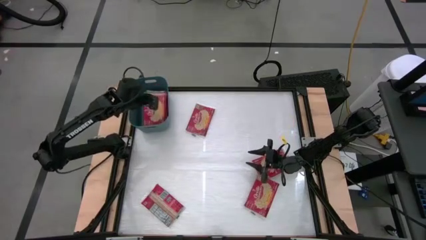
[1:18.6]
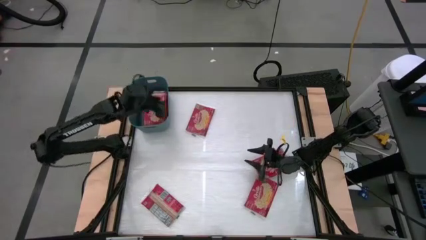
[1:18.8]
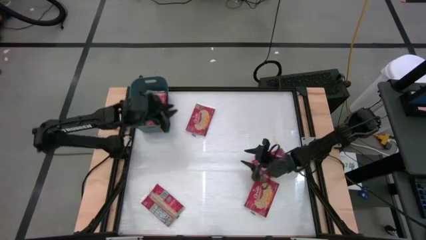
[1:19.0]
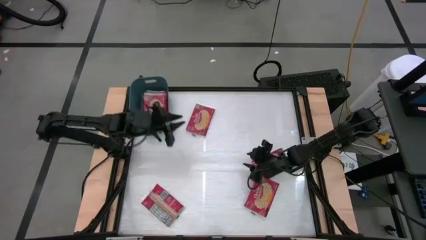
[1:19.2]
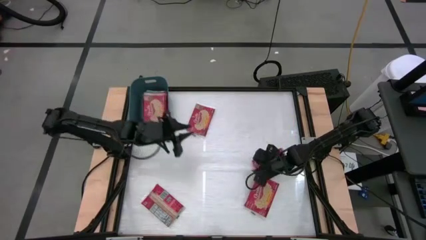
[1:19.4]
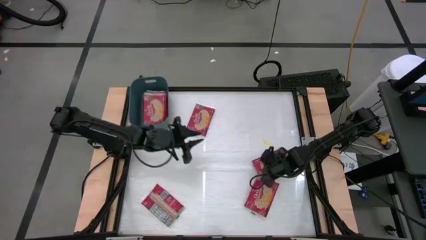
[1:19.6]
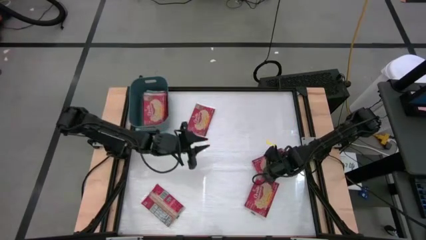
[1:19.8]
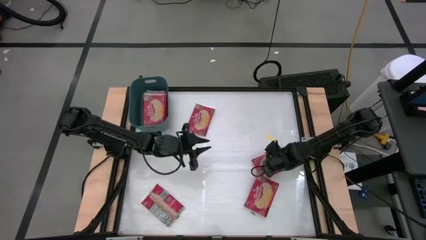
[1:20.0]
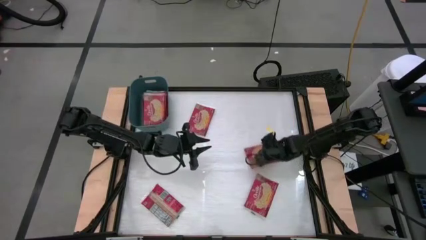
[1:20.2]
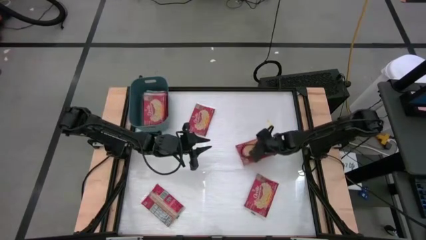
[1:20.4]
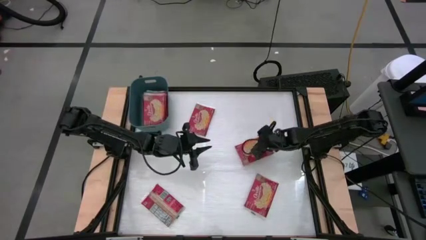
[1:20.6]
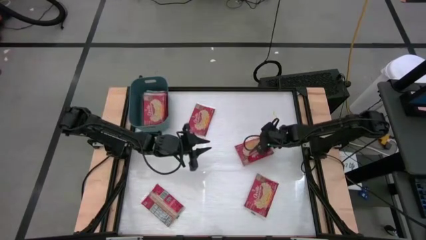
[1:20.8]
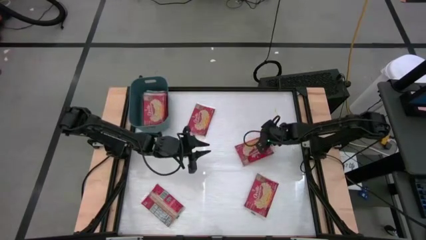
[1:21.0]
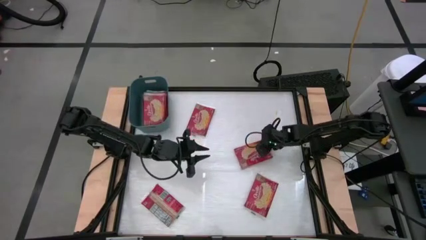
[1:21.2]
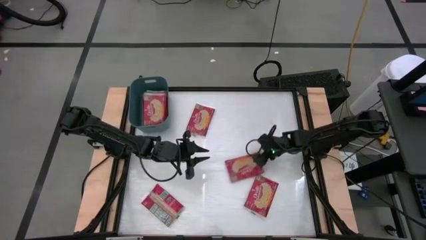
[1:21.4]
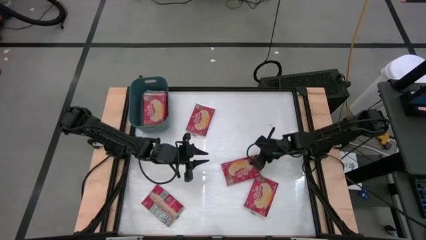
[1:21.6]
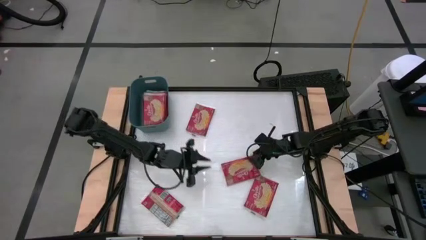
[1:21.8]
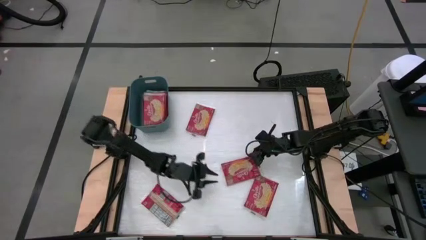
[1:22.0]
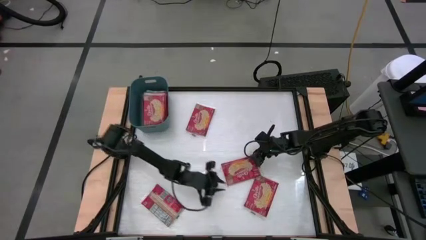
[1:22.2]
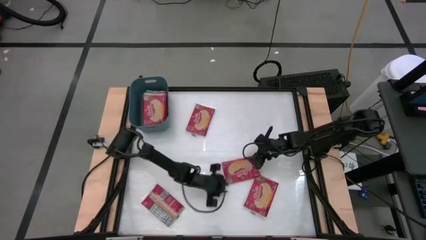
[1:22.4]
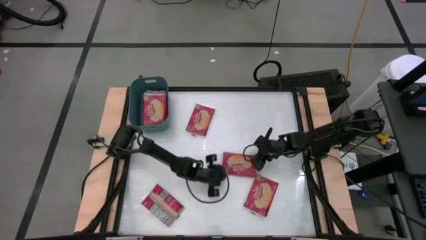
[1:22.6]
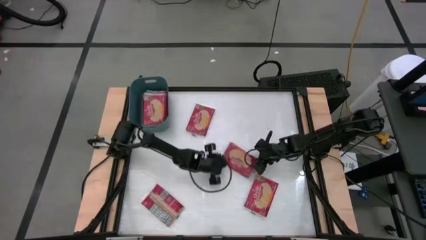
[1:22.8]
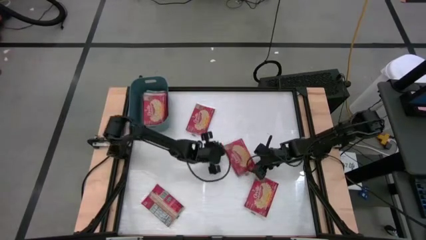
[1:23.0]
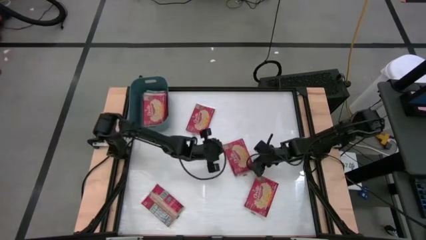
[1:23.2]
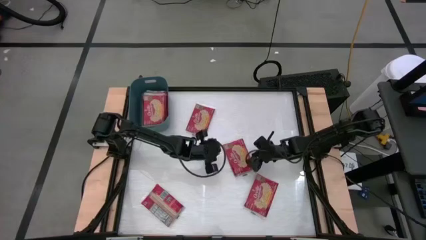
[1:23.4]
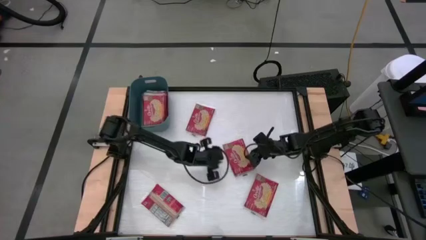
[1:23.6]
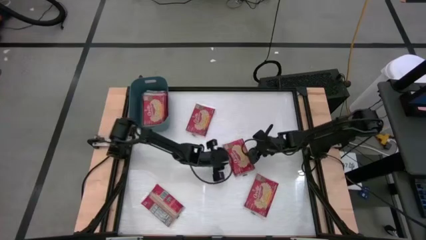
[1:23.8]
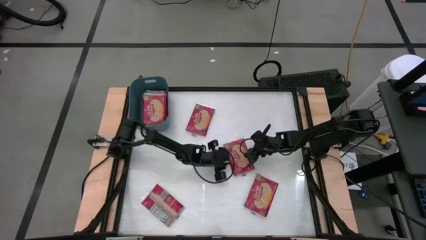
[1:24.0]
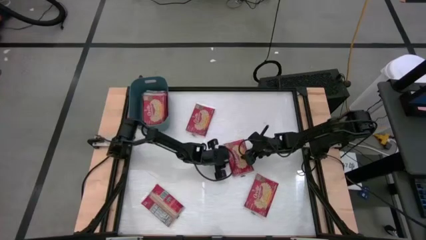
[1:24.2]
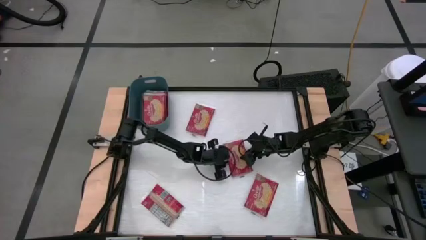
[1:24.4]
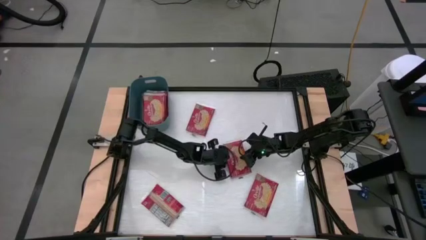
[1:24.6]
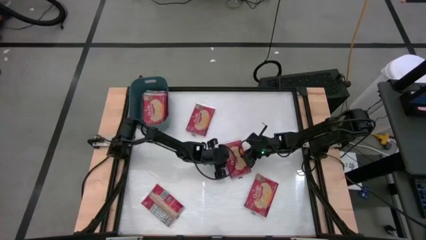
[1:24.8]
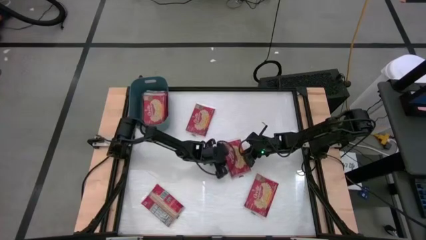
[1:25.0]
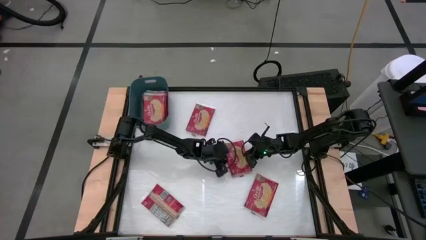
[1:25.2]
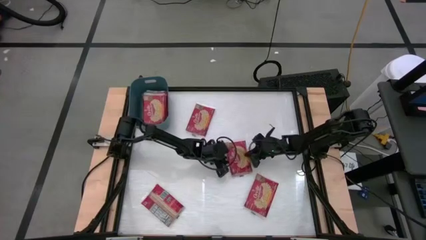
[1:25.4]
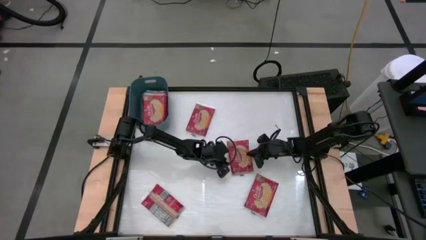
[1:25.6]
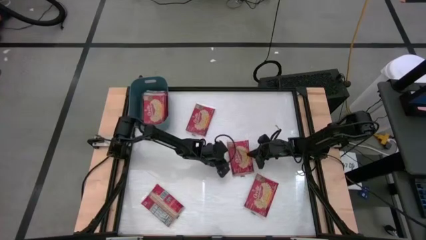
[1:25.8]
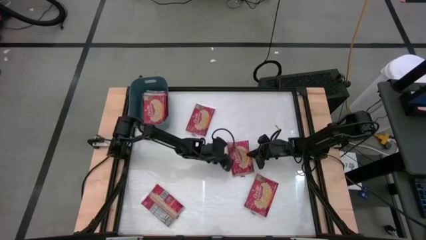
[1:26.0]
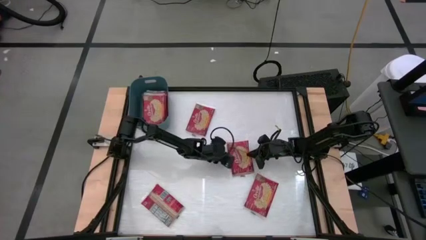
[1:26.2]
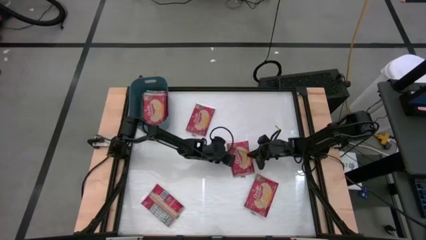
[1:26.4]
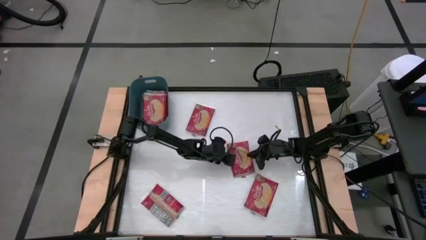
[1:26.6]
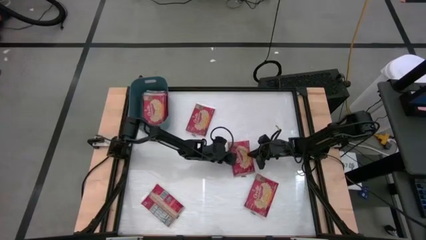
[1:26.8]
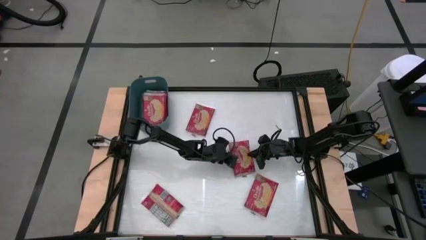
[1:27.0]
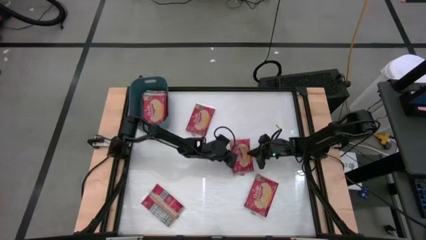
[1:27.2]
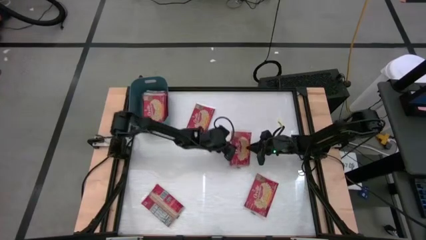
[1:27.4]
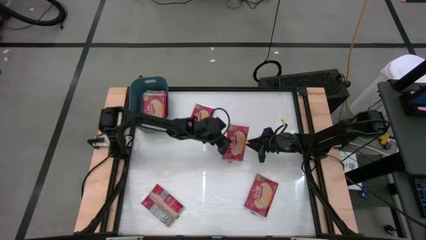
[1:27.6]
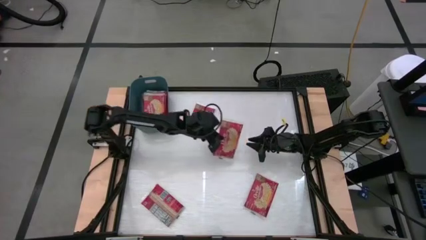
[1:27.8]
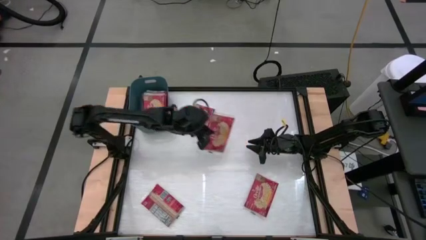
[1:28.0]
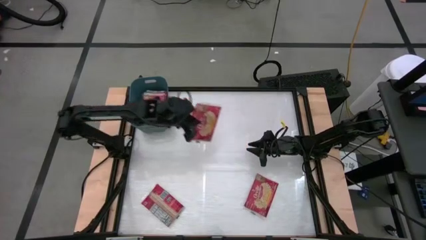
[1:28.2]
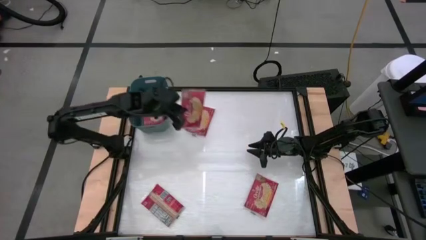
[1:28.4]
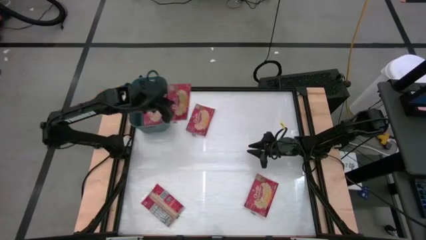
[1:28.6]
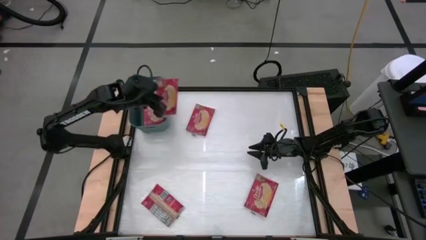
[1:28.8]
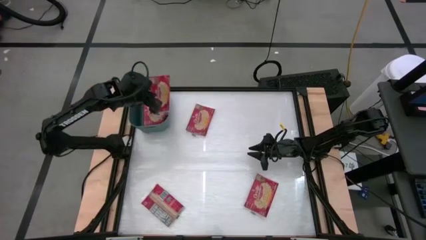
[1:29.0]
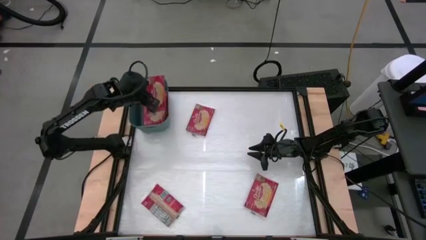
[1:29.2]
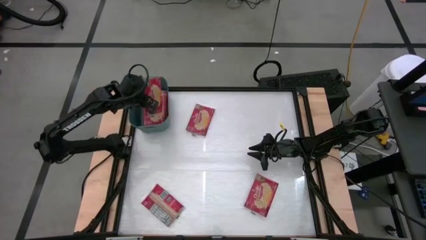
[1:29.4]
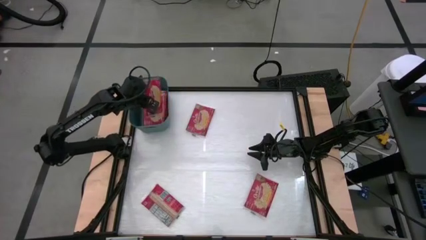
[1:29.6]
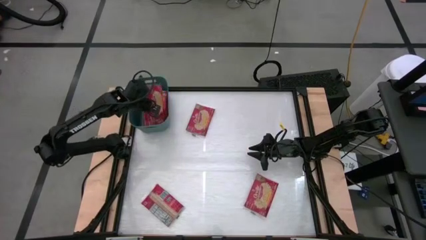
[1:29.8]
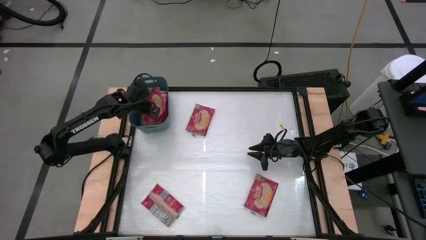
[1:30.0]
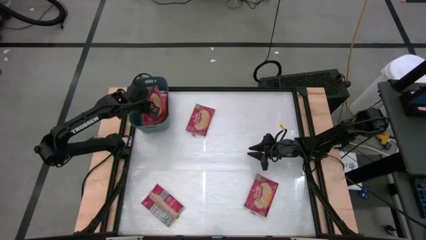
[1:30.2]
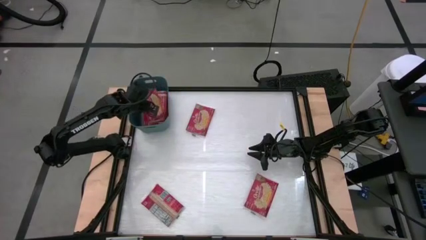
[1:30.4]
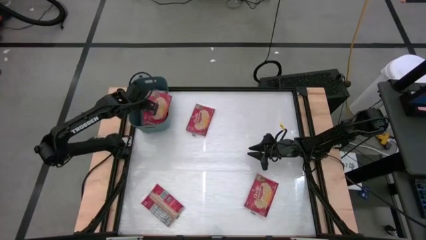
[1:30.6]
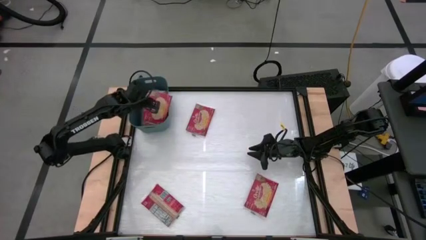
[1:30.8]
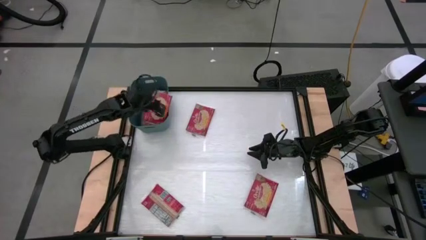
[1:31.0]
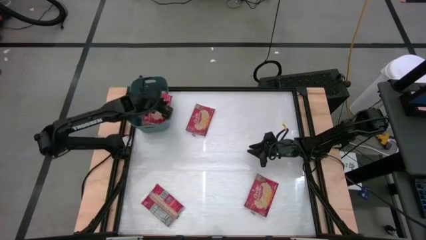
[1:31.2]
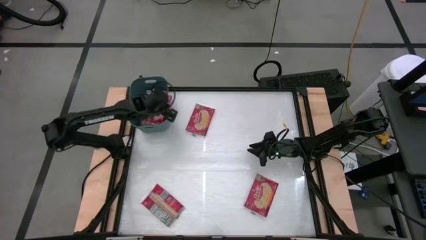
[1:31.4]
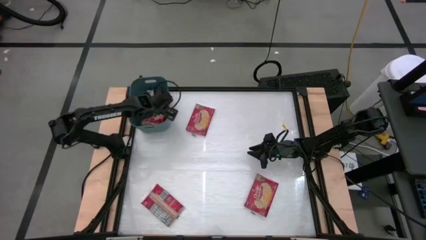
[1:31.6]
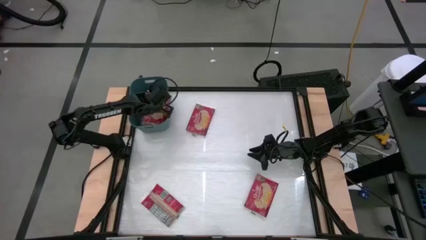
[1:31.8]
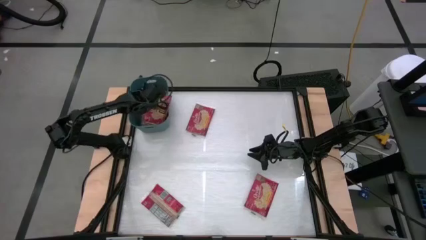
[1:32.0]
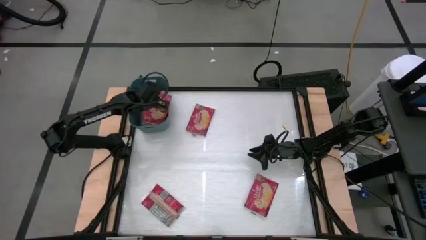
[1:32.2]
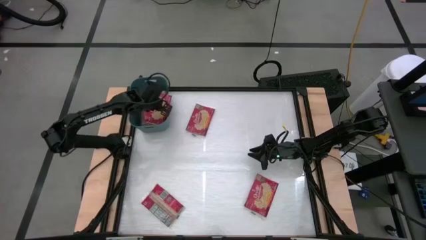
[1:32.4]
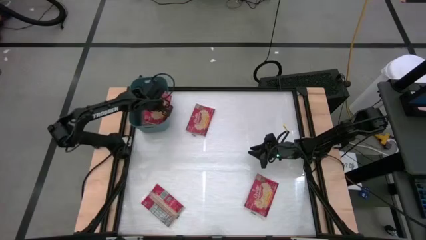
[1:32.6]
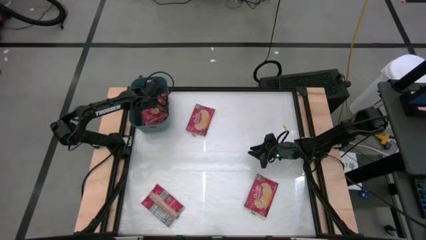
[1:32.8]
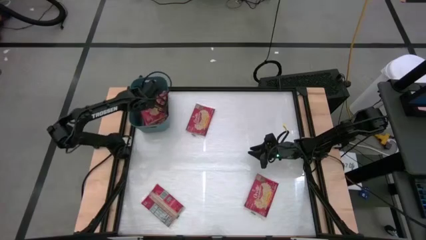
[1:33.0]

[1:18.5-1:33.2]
Task: Sort popcorn bags into baskets
Stack the red popcorn bag on top of the other red popcorn bag into the blue bin

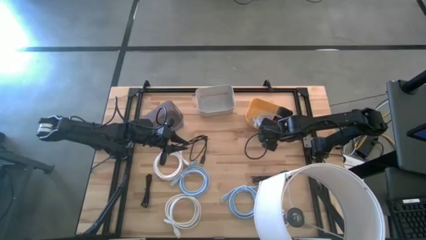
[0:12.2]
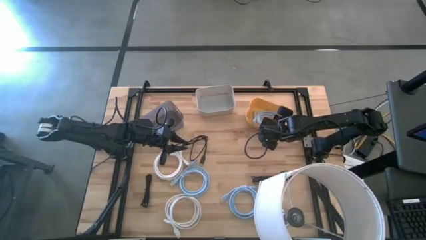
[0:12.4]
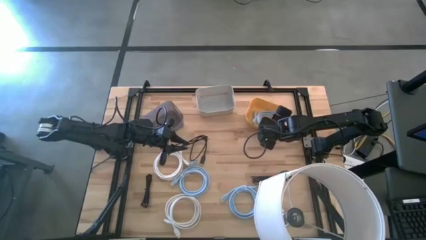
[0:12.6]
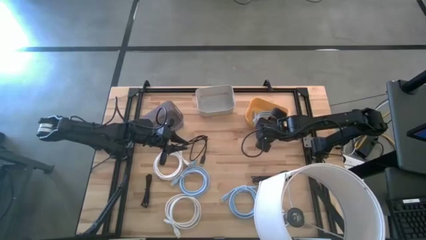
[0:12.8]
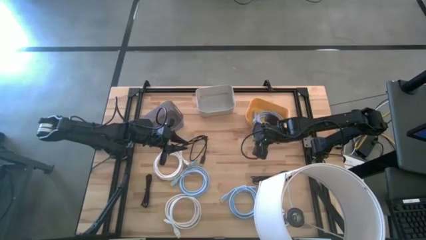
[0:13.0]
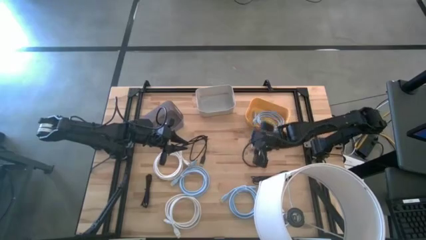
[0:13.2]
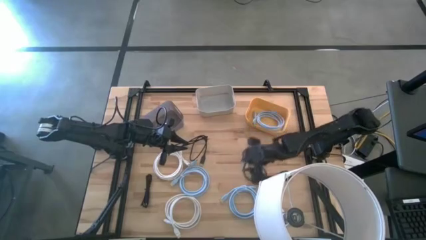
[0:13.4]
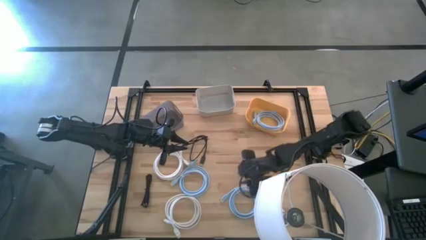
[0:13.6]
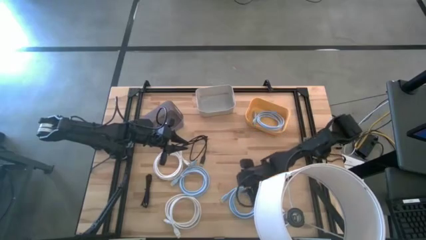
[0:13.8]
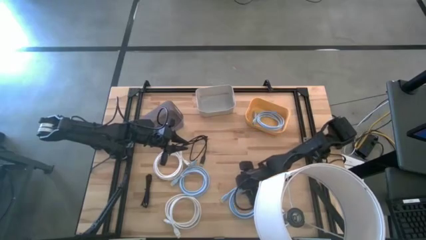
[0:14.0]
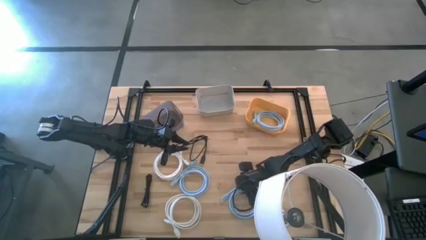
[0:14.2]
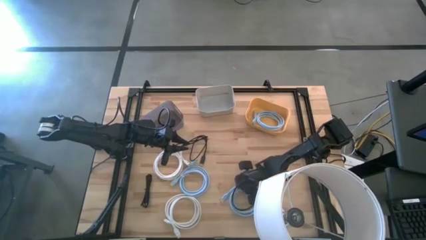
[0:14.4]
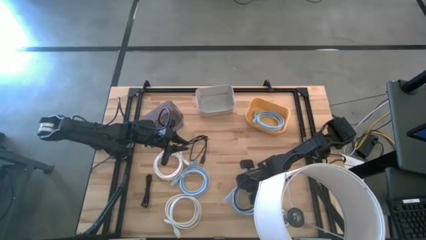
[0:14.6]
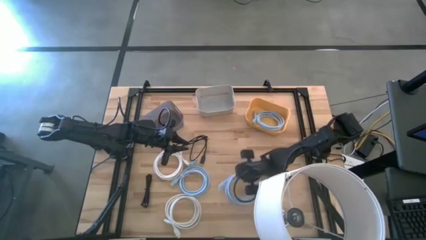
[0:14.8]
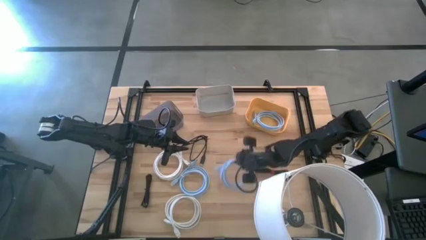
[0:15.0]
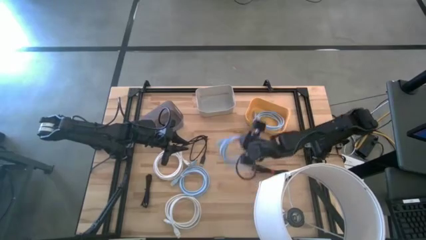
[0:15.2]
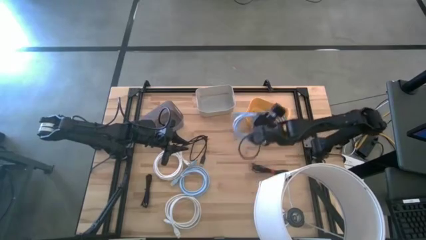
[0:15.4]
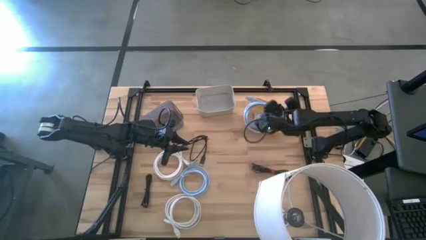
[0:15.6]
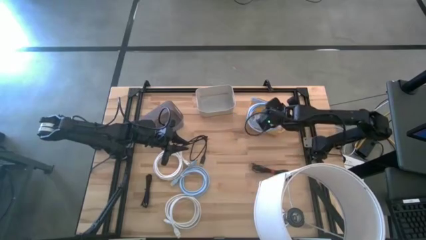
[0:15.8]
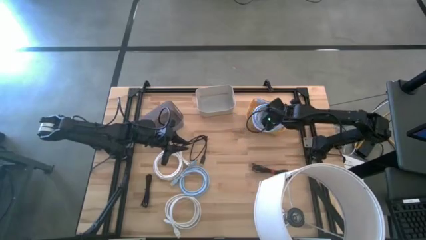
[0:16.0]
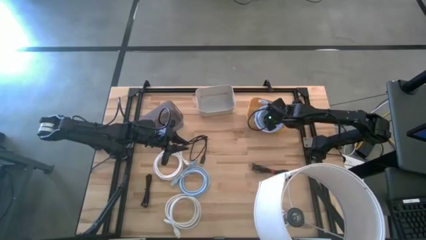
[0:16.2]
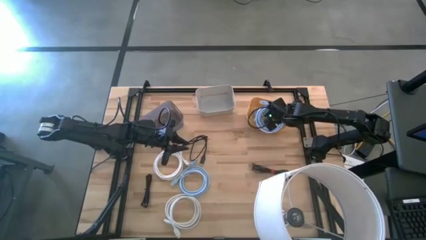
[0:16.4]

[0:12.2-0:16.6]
Task: Pick & Place USB Port
Put the right blue hdmi cable into the yellow bin
